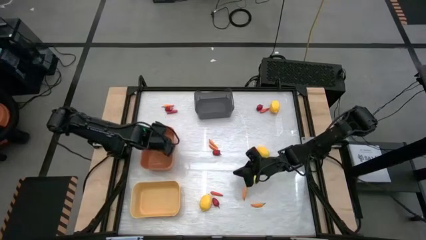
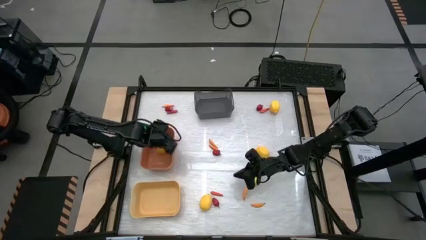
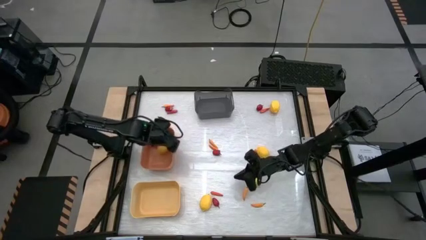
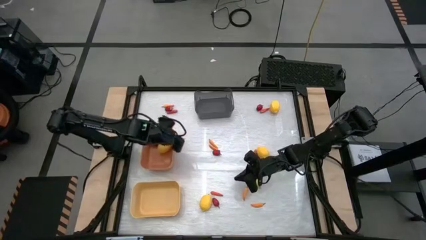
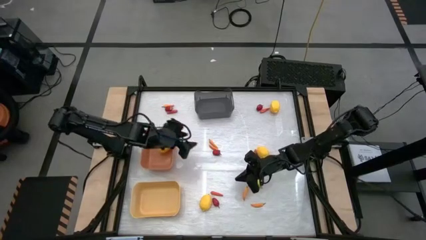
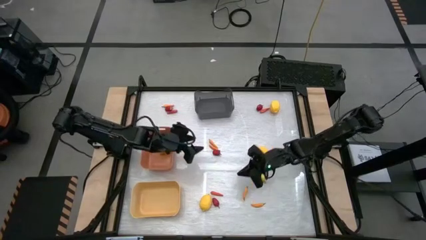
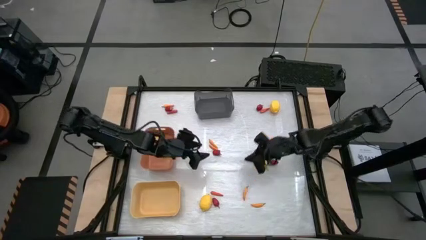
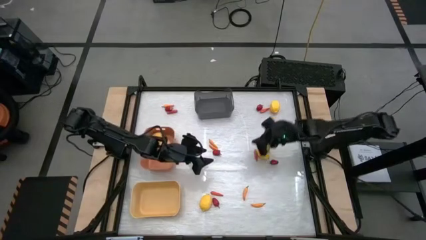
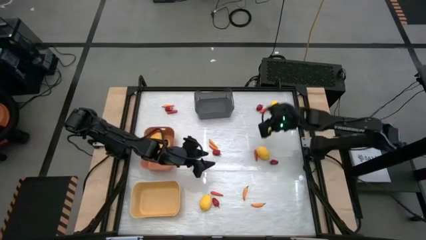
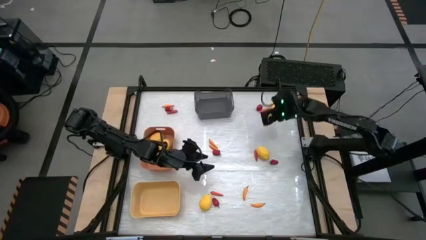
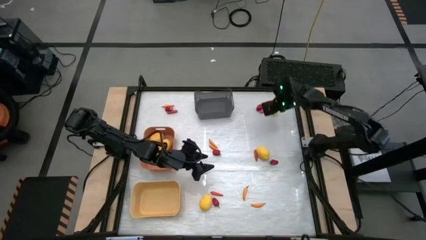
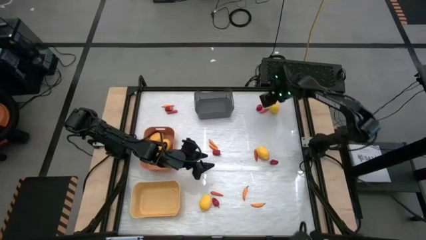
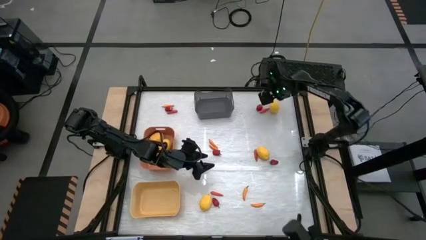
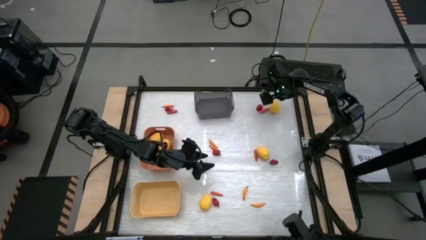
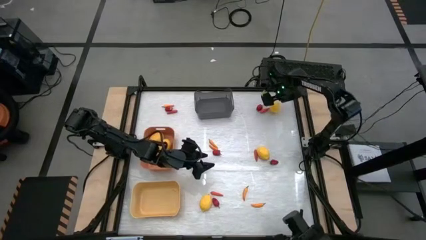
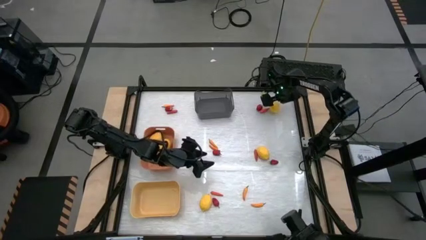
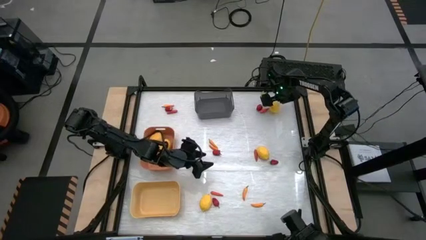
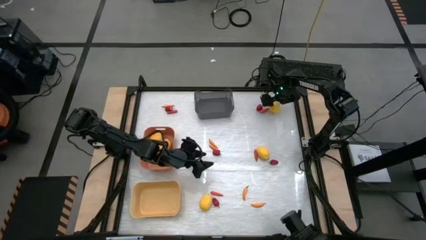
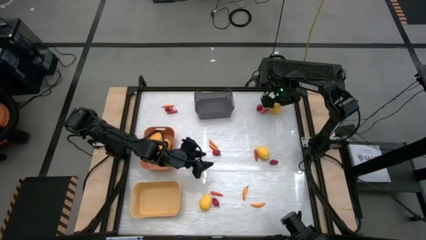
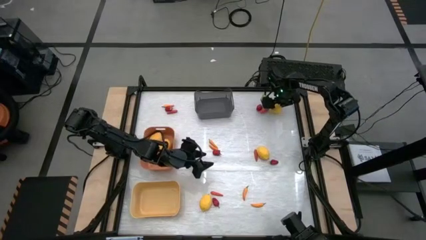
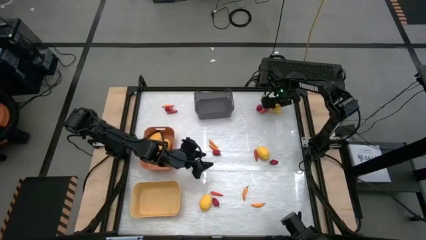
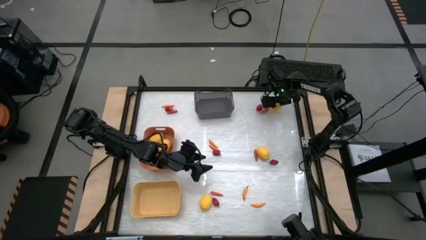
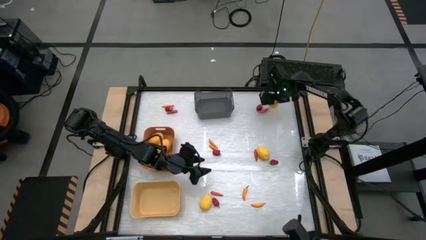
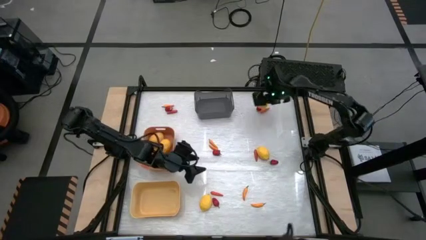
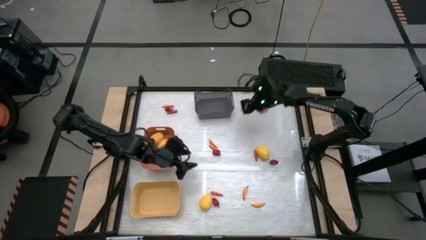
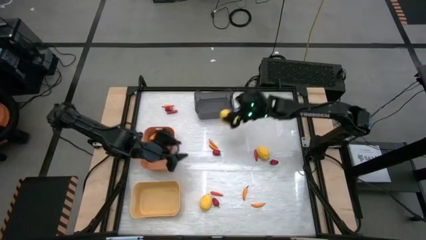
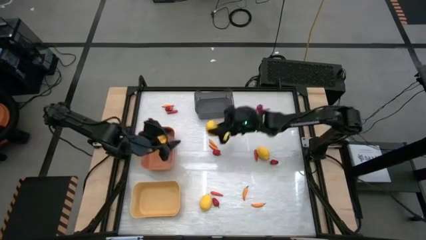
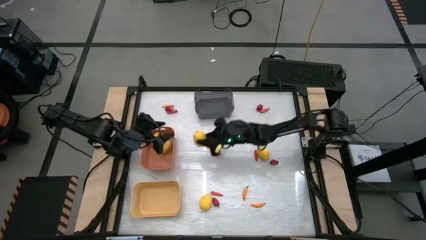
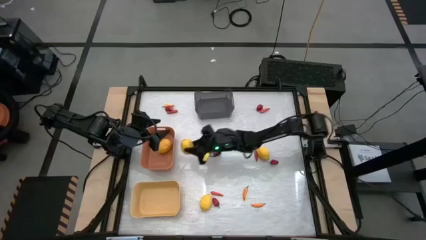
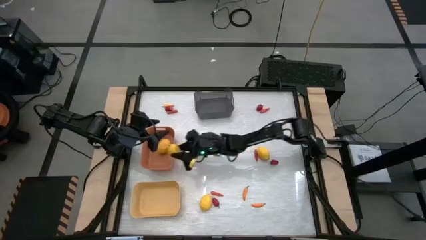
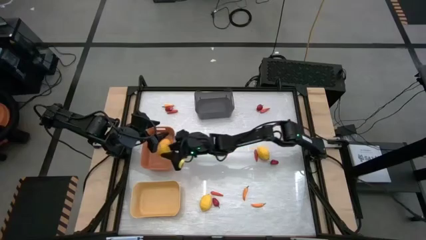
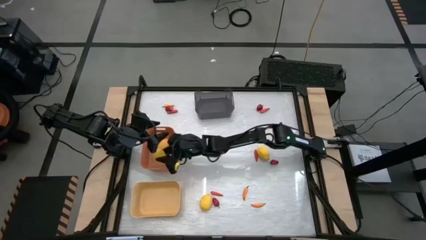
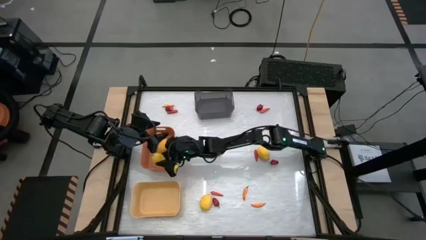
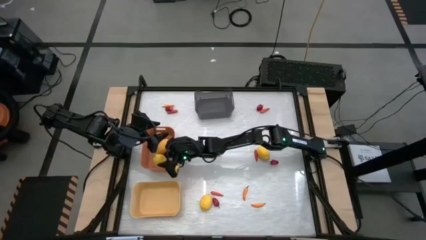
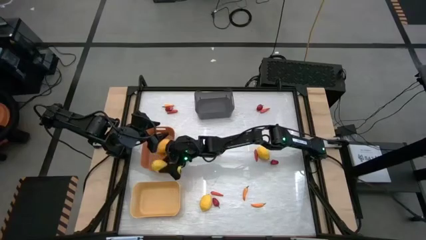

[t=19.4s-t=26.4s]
Task: Sort produce into baskets
Put the yellow lemon into the orange bin

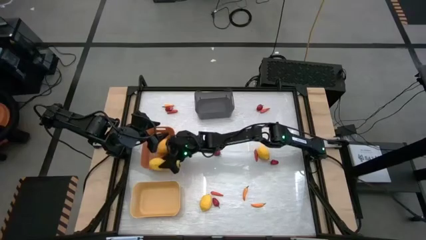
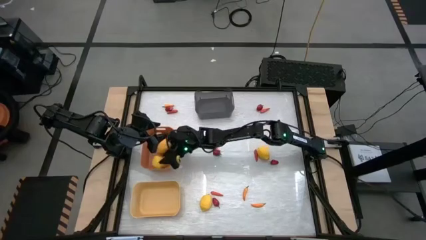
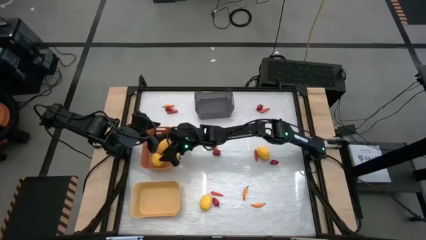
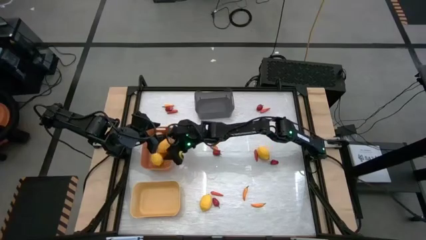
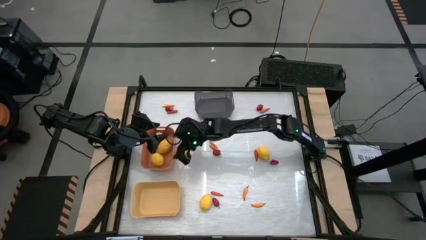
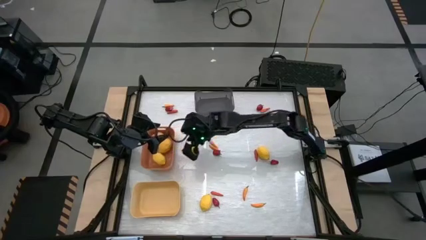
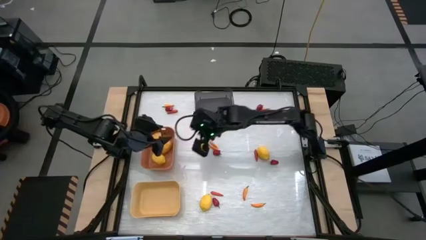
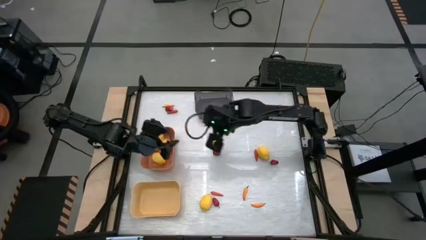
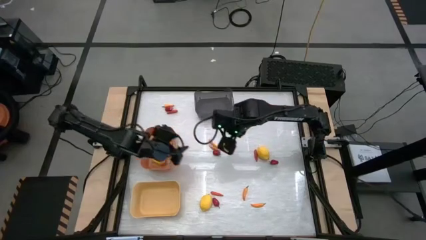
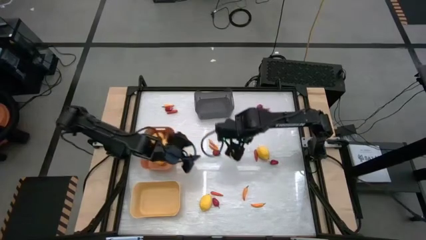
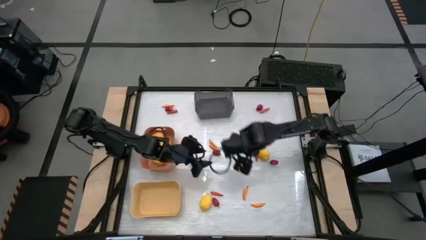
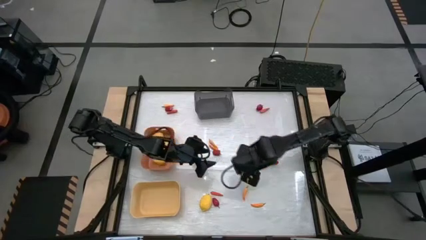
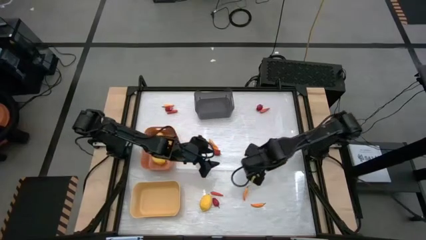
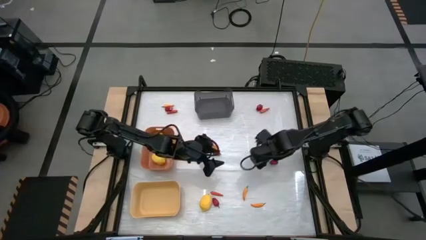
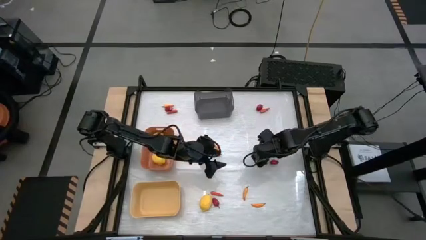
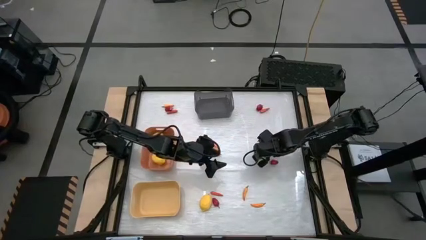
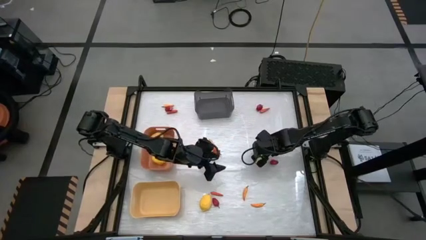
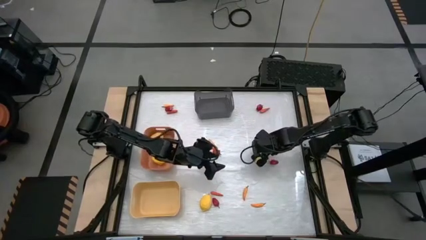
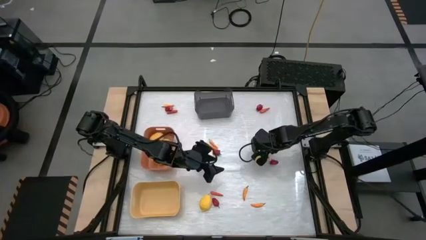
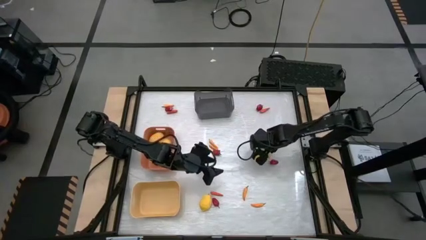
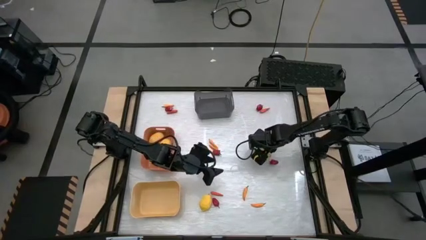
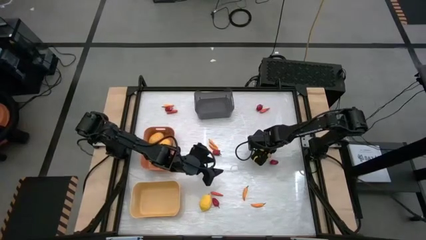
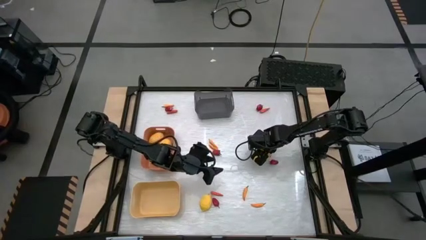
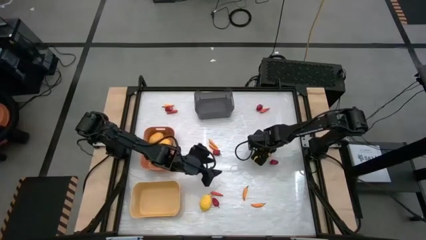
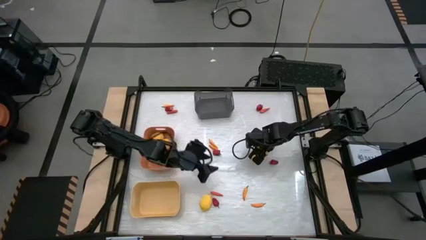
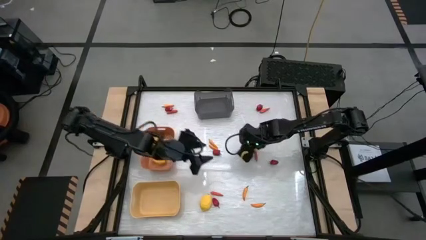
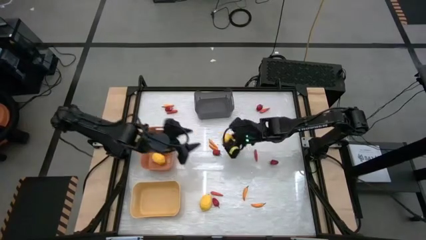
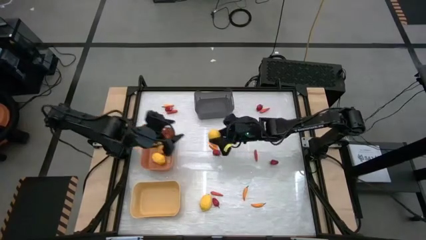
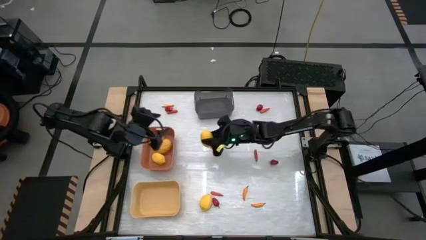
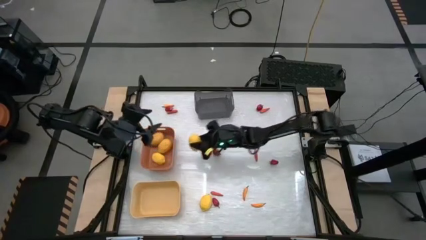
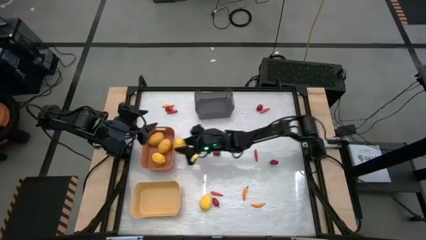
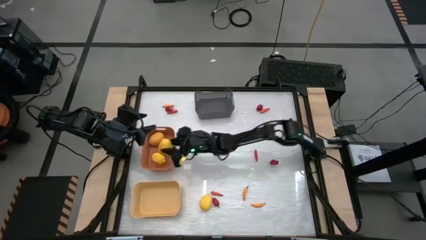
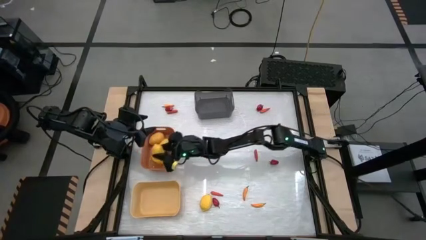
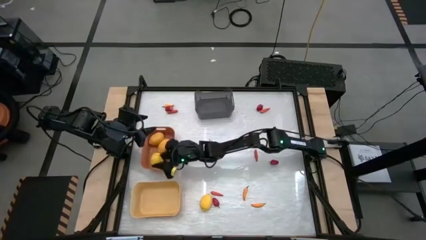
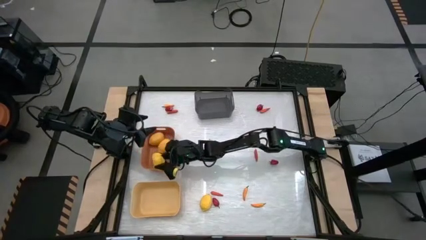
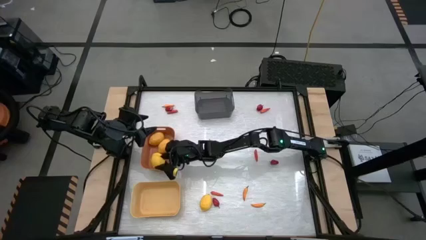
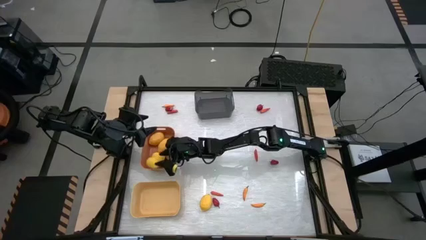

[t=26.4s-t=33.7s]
Put the yellow lemon into the orange bin
